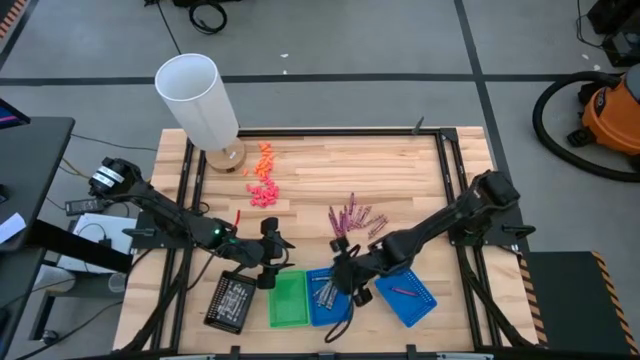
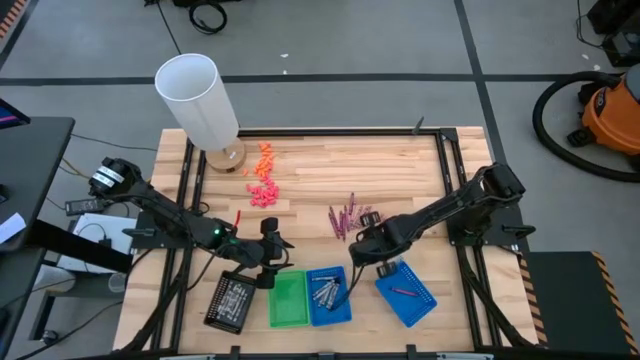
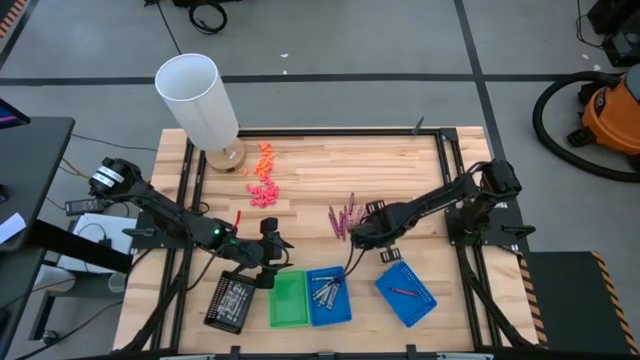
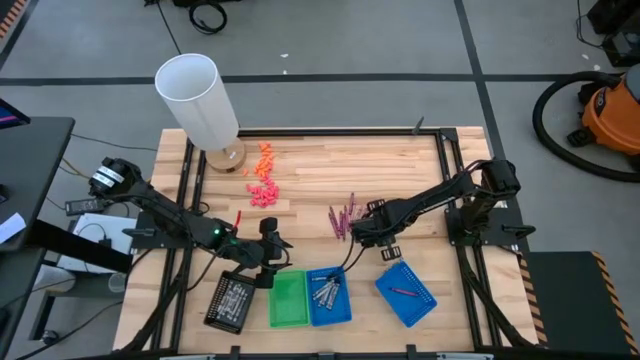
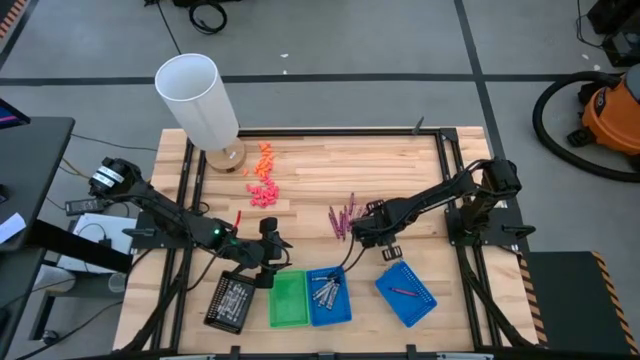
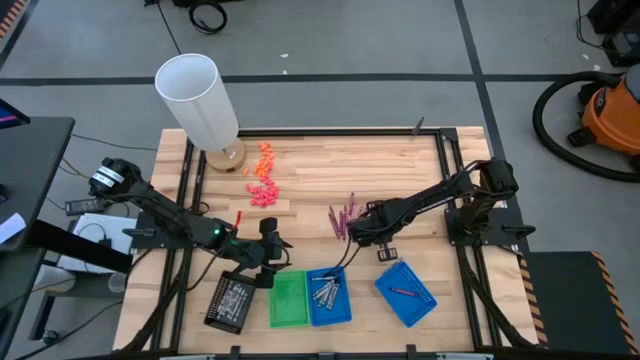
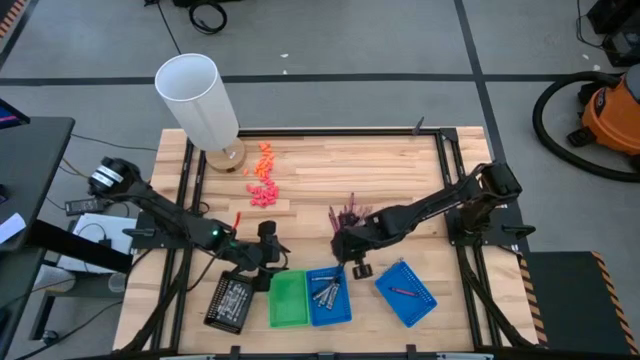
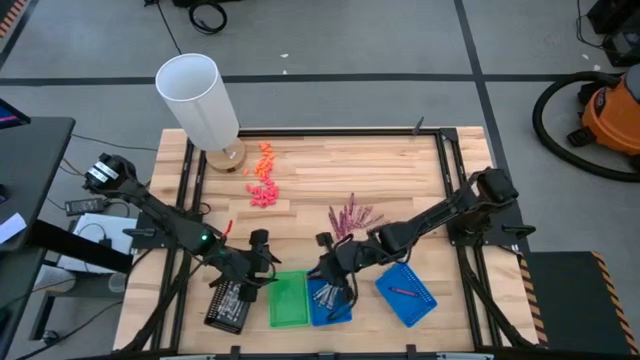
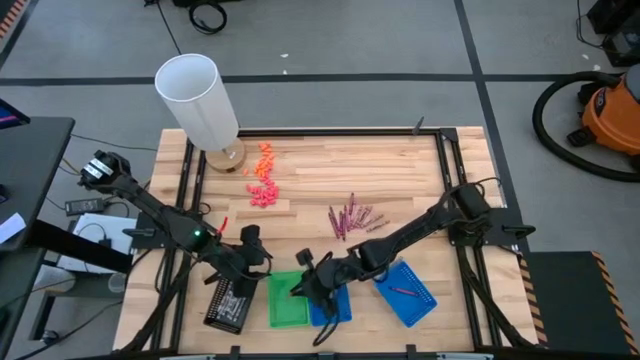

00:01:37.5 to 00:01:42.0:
Task: Sort crayons
Put the pink crayon into the green bin

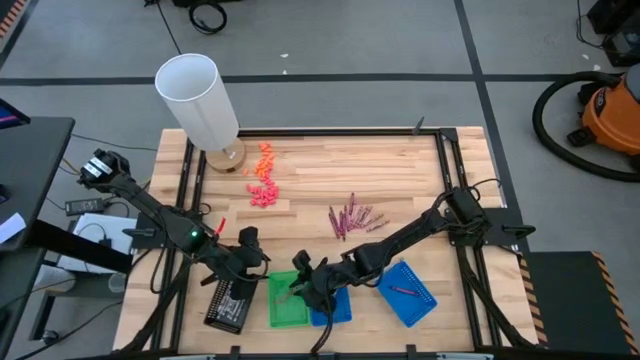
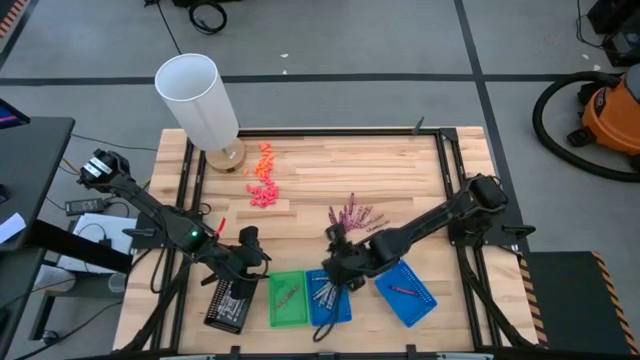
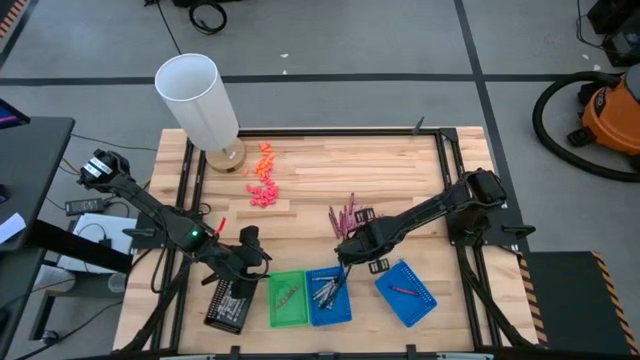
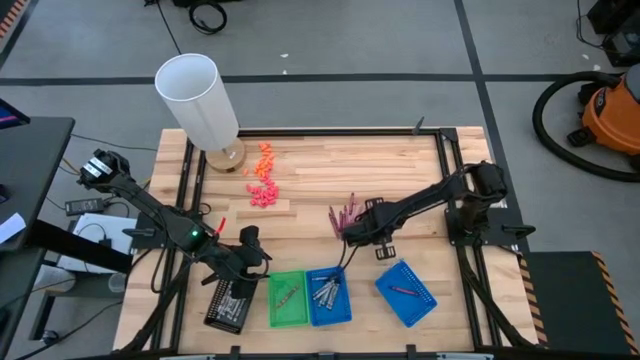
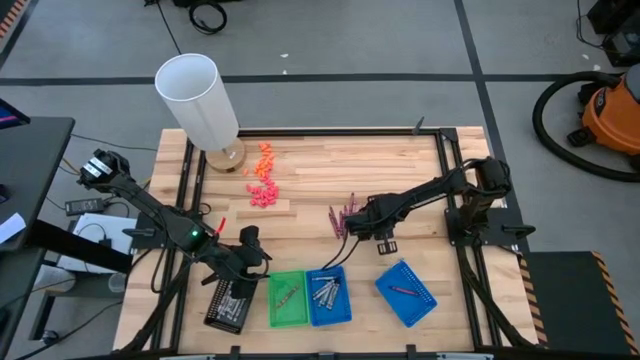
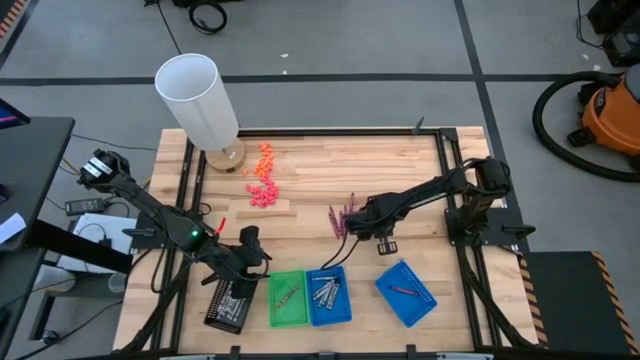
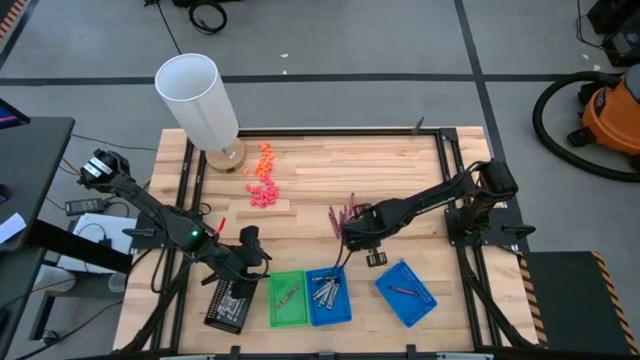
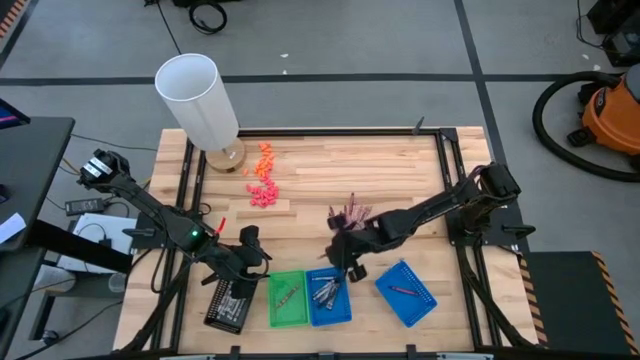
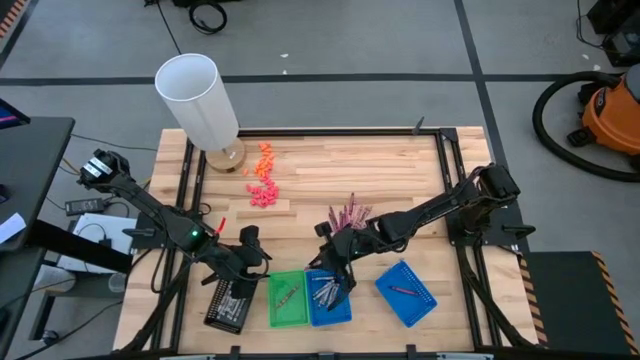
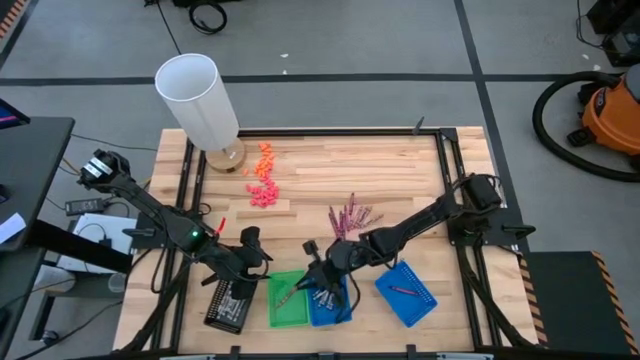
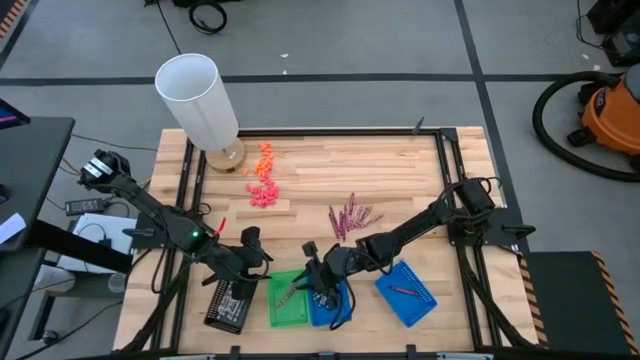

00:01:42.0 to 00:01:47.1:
Put the pink crayon into the green bin

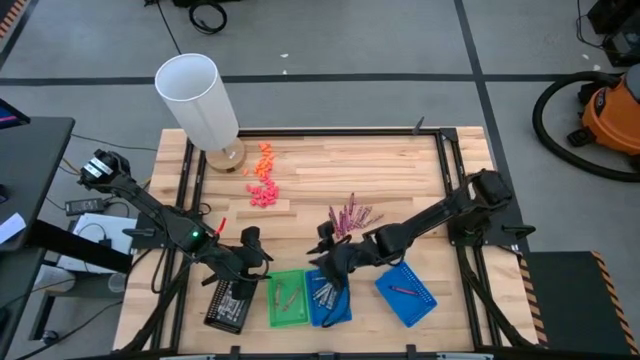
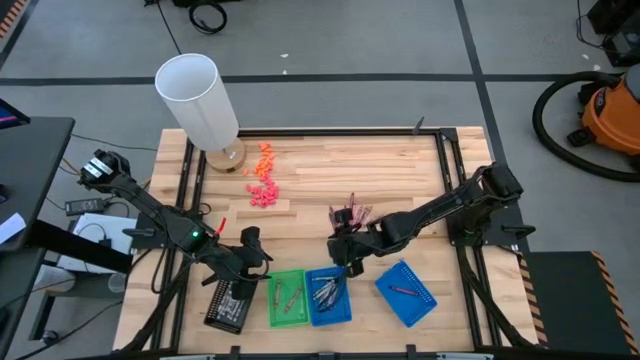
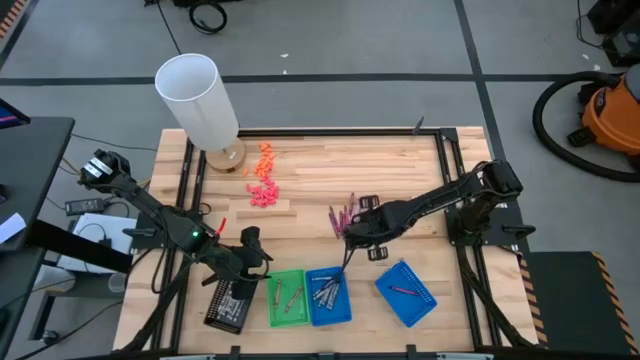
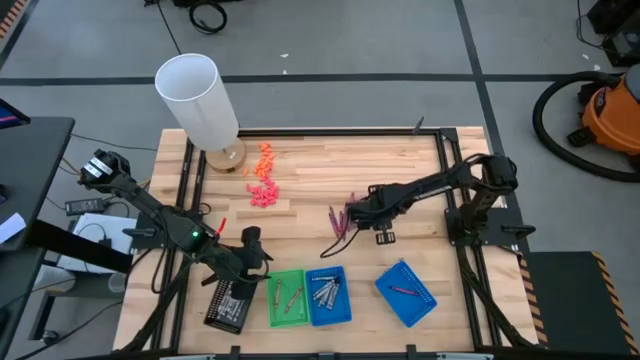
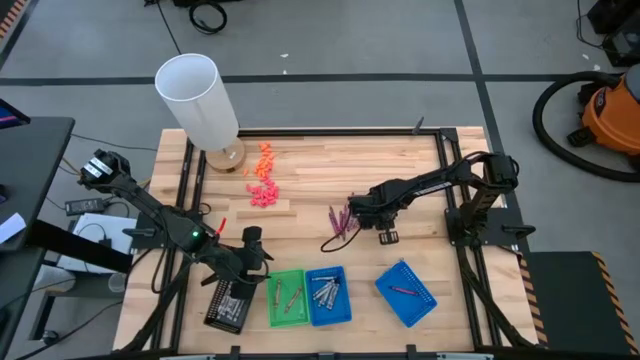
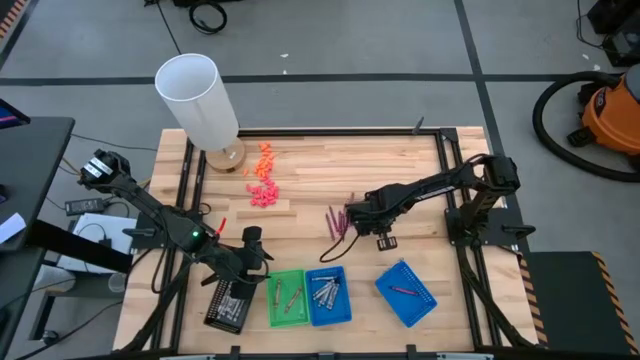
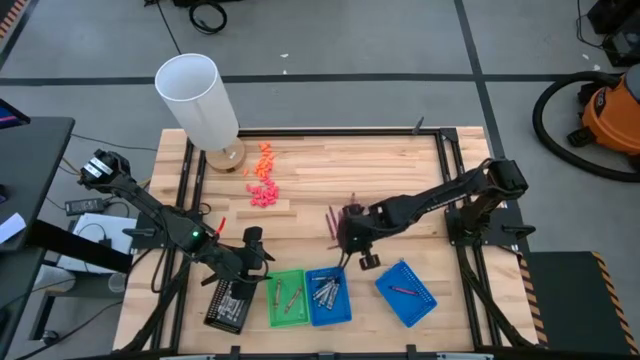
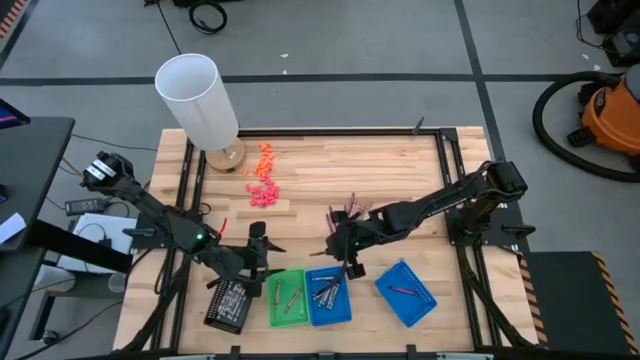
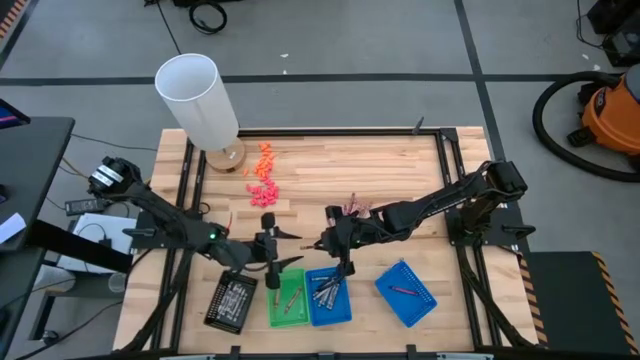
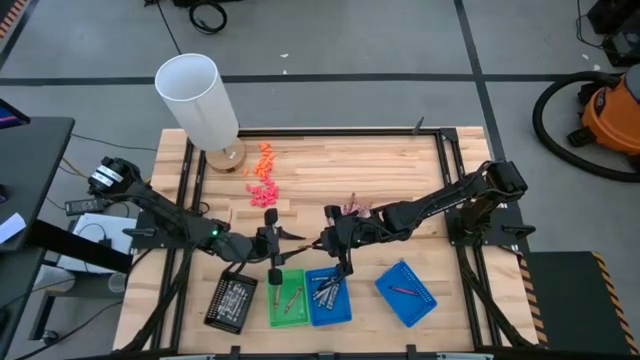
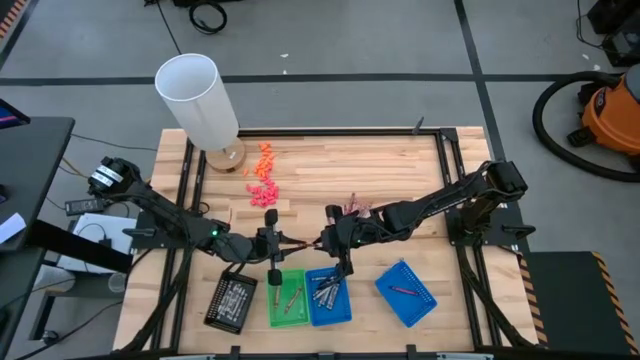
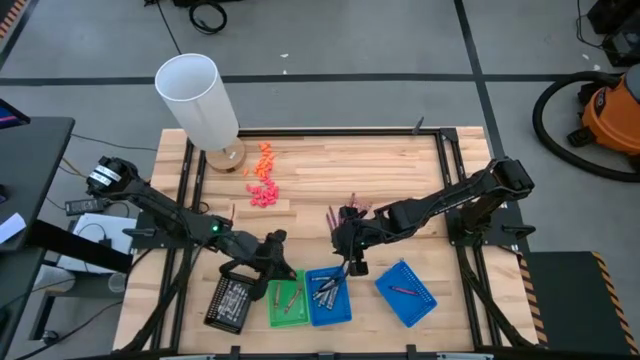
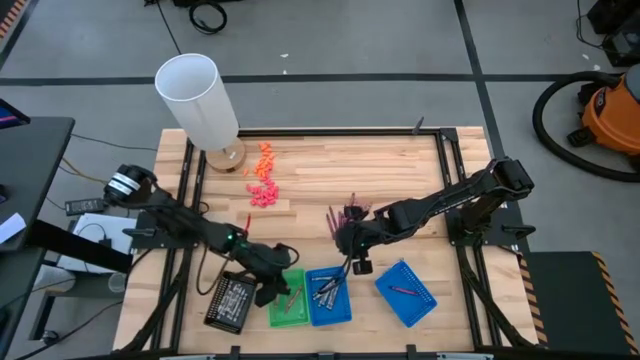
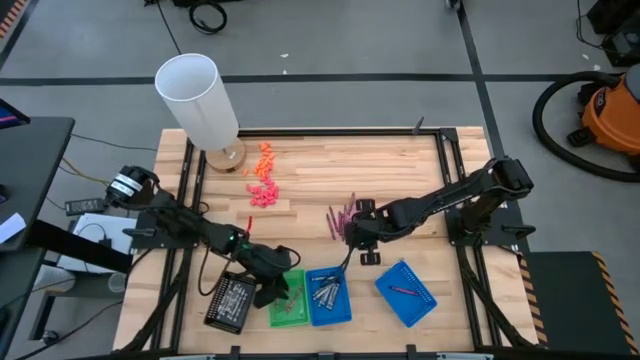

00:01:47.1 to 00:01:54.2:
Put the pink crayon into the green bin

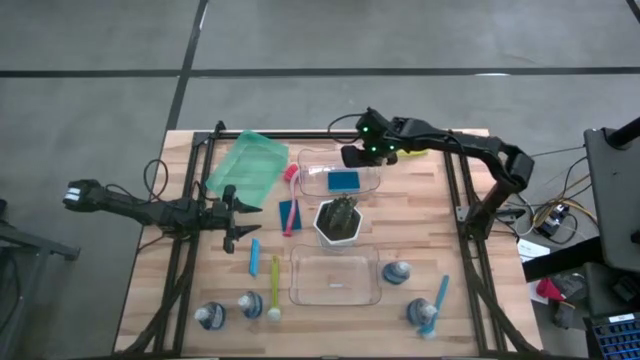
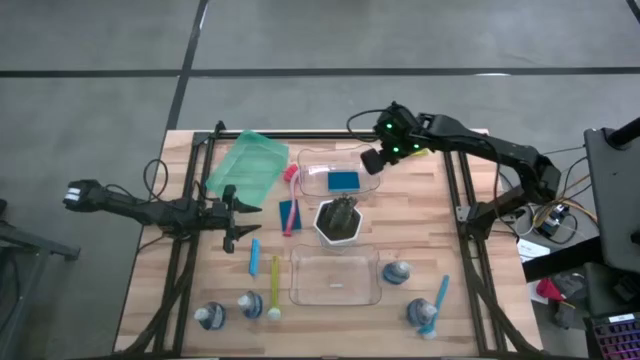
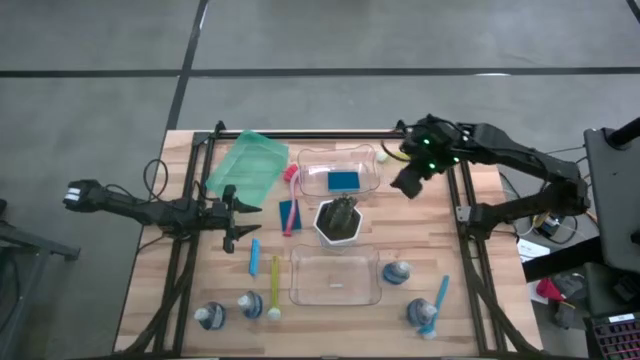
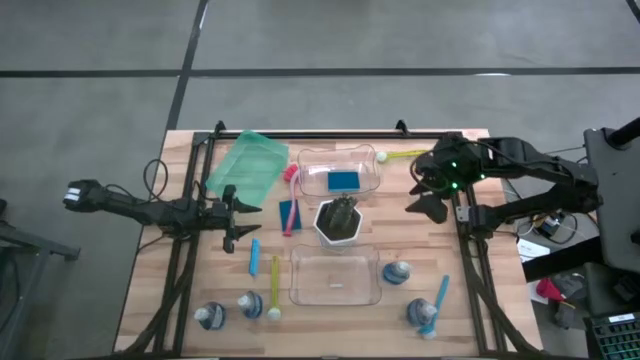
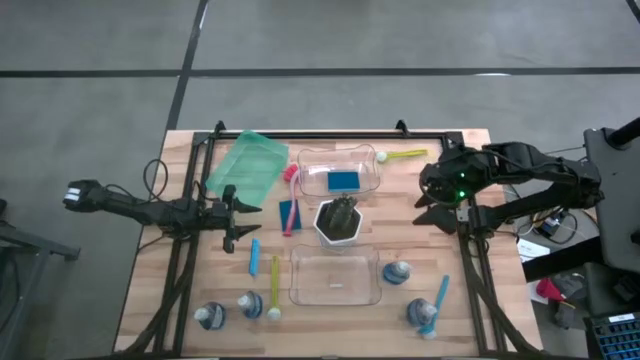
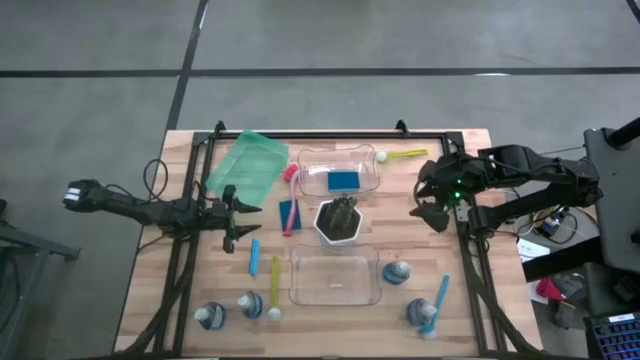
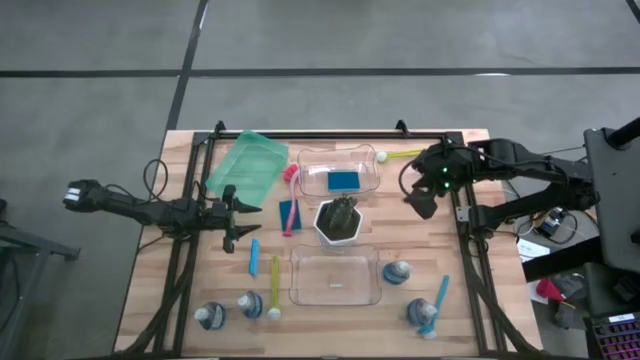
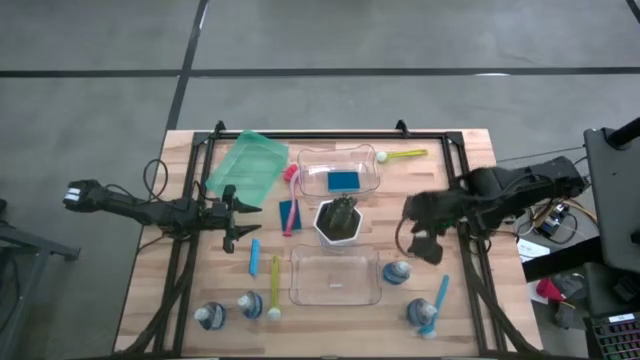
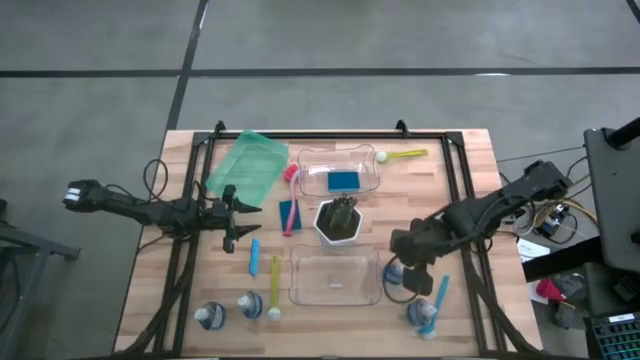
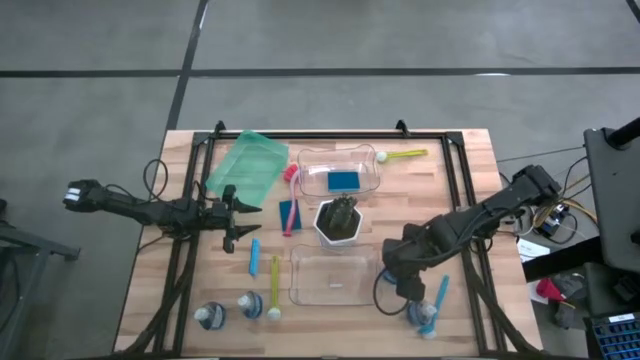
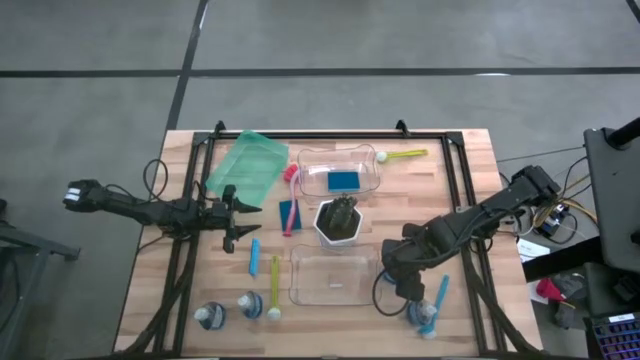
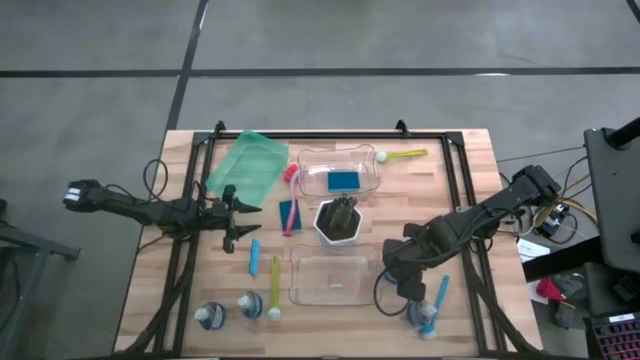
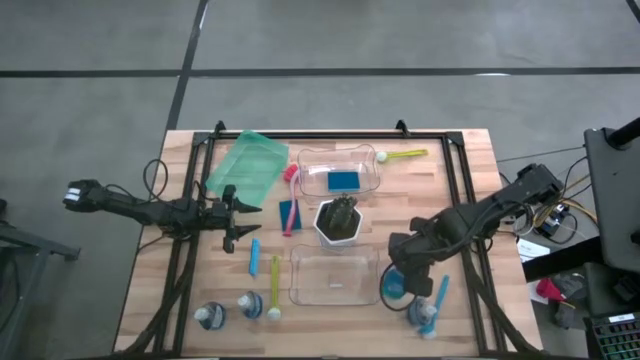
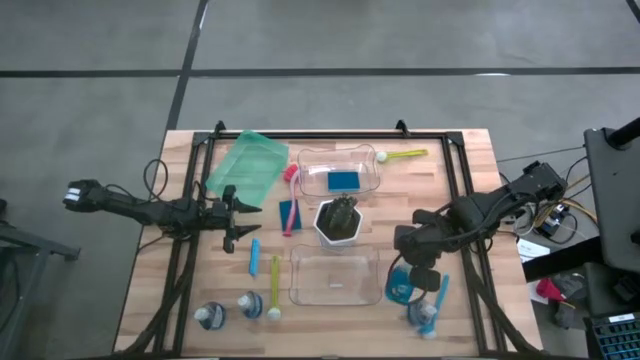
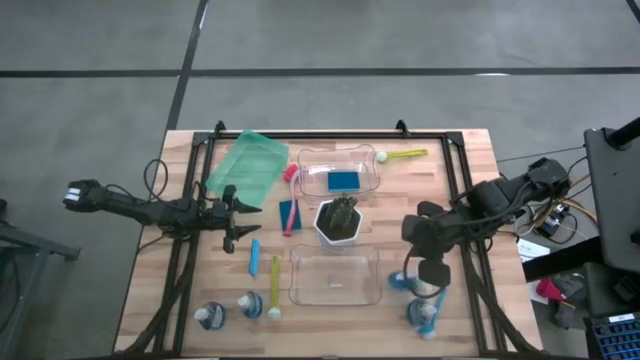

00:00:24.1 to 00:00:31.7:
Task: Pick & Place Kitchen Sink Supplies
Put the blue dishwashing liquid bottle into the bottom transparent bin
